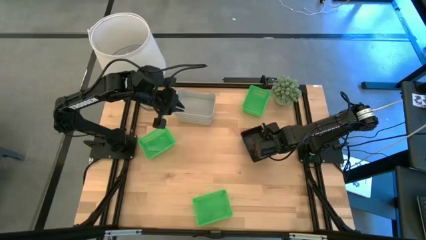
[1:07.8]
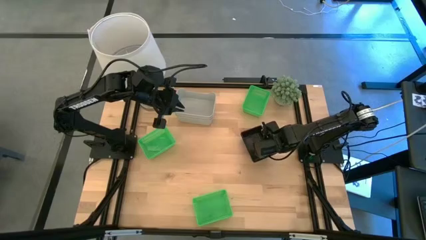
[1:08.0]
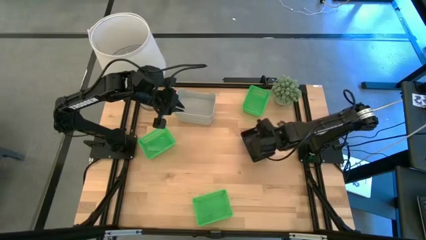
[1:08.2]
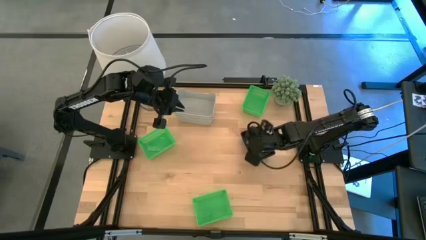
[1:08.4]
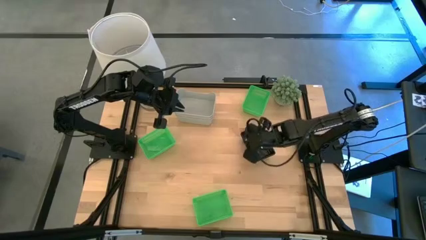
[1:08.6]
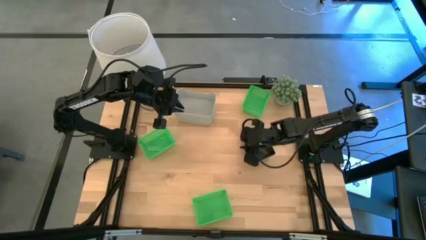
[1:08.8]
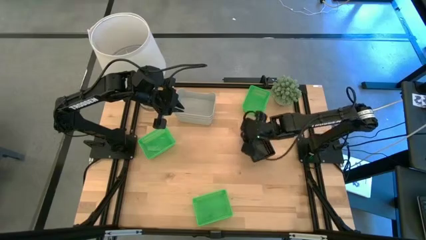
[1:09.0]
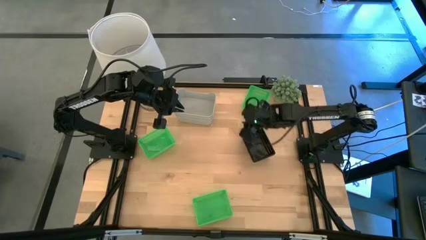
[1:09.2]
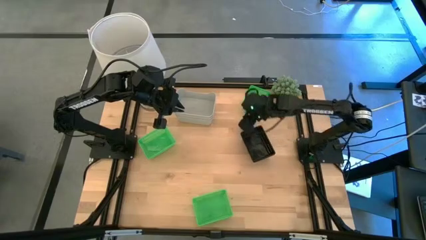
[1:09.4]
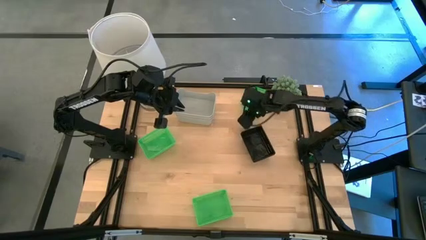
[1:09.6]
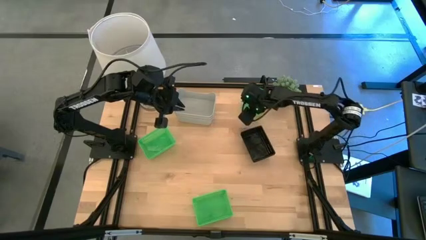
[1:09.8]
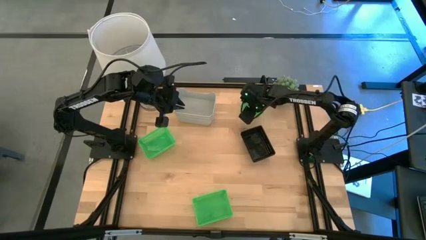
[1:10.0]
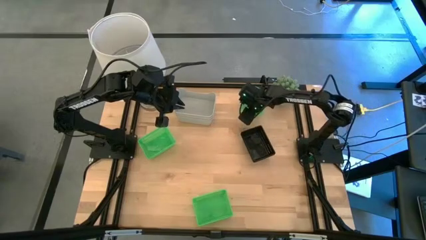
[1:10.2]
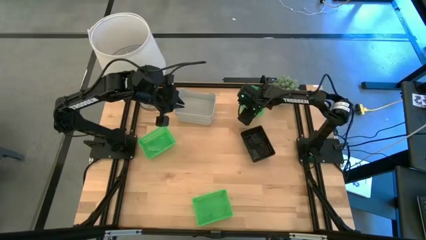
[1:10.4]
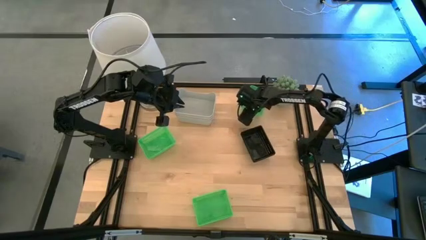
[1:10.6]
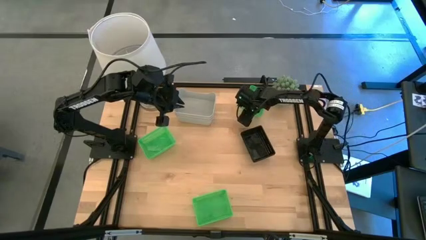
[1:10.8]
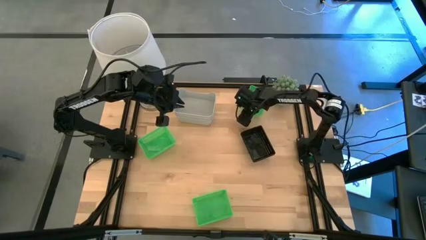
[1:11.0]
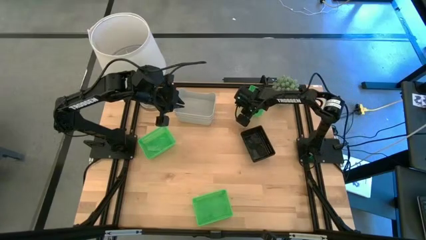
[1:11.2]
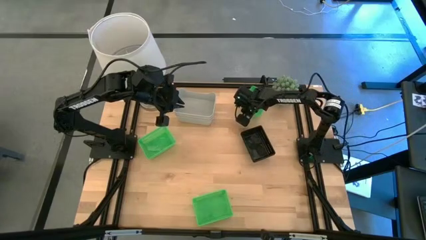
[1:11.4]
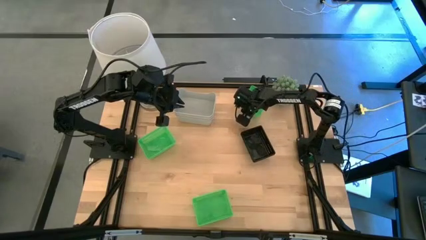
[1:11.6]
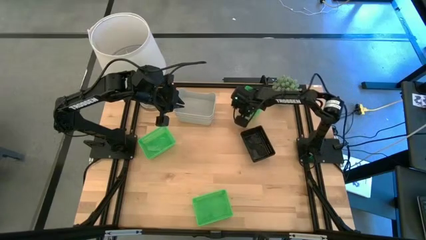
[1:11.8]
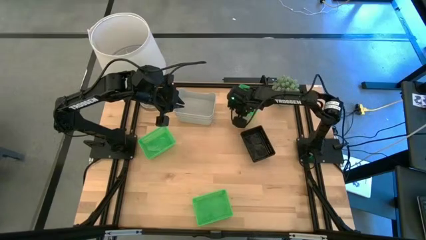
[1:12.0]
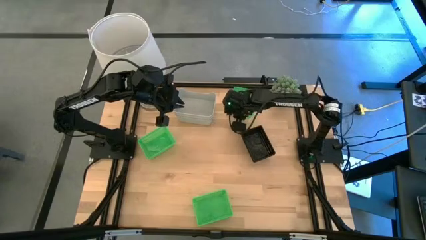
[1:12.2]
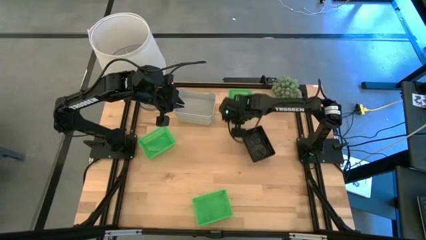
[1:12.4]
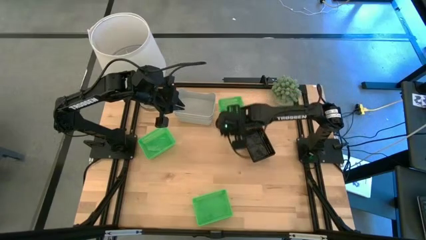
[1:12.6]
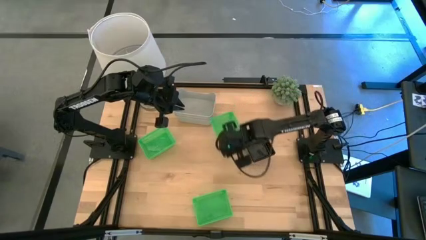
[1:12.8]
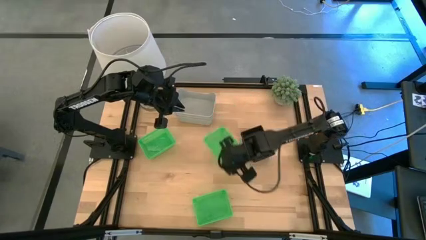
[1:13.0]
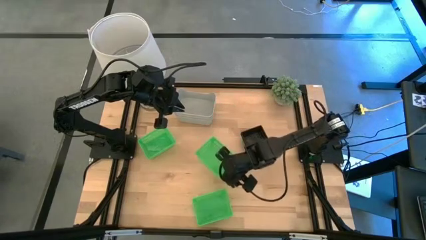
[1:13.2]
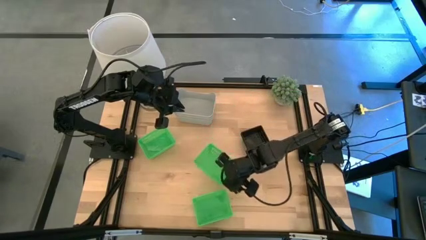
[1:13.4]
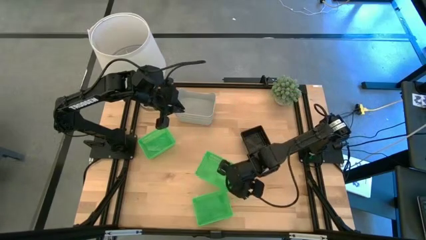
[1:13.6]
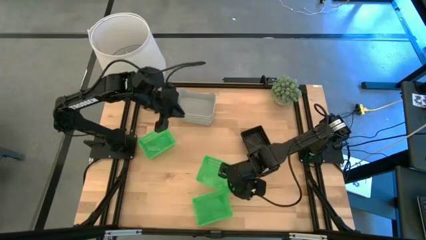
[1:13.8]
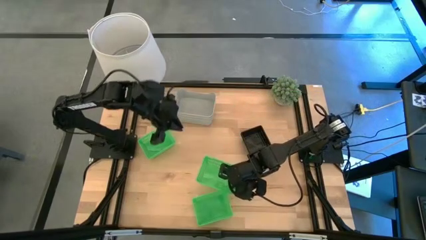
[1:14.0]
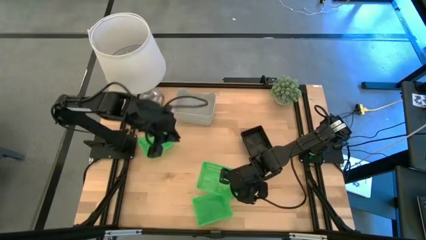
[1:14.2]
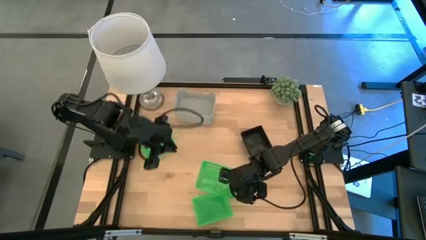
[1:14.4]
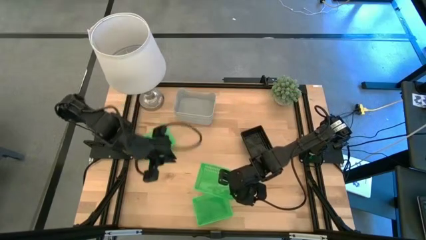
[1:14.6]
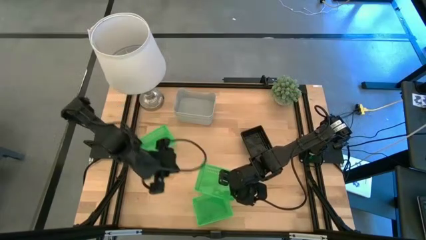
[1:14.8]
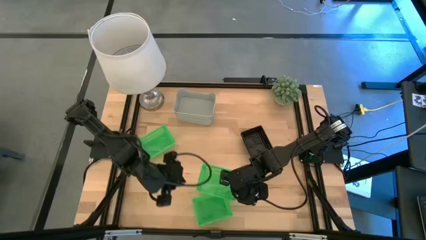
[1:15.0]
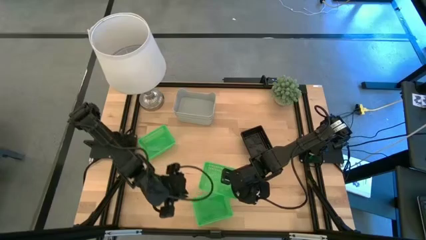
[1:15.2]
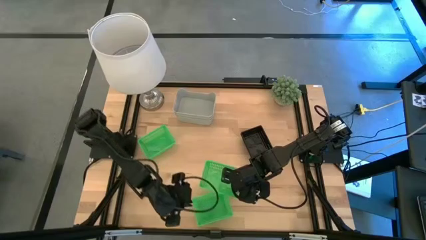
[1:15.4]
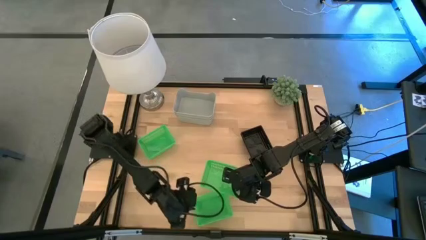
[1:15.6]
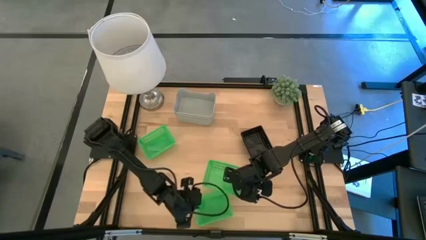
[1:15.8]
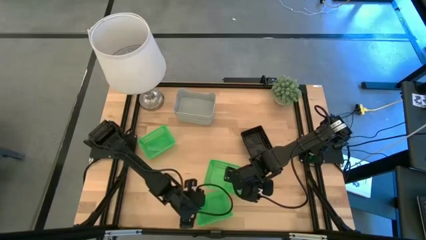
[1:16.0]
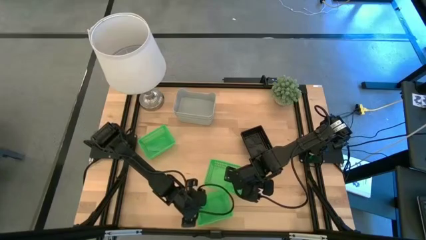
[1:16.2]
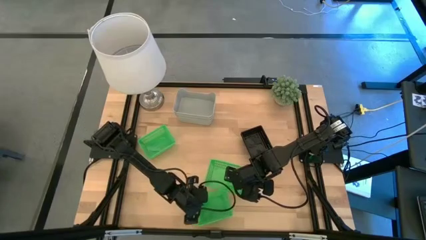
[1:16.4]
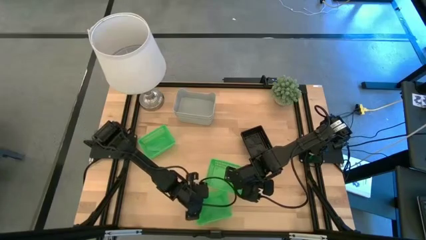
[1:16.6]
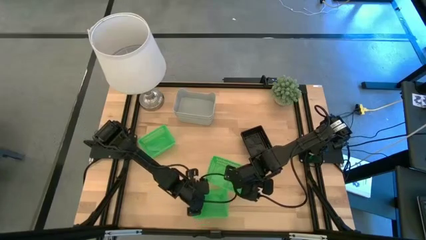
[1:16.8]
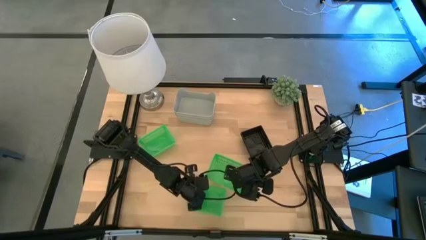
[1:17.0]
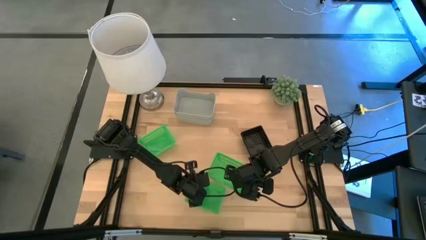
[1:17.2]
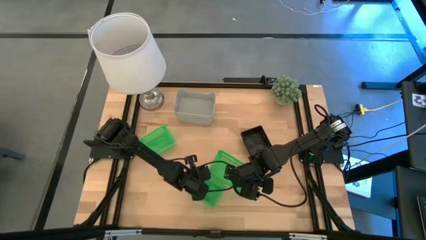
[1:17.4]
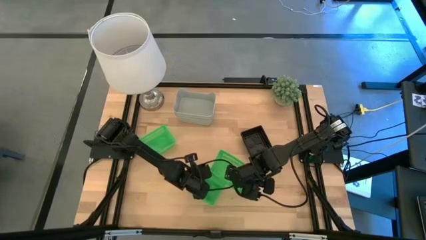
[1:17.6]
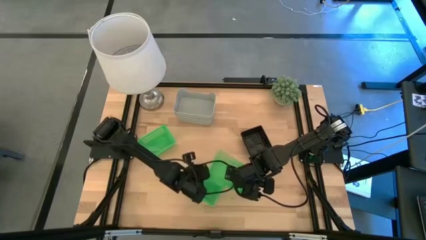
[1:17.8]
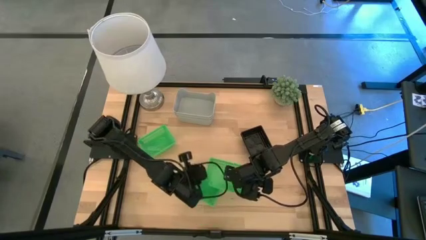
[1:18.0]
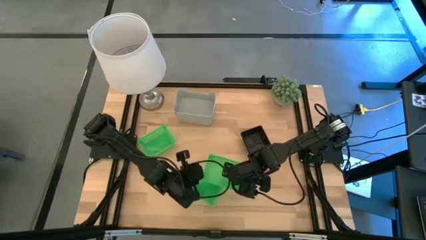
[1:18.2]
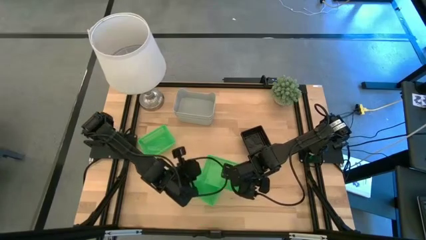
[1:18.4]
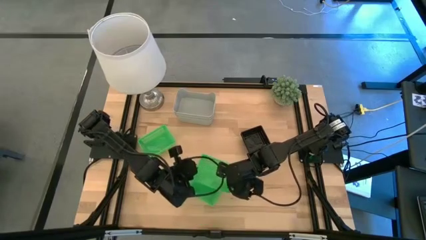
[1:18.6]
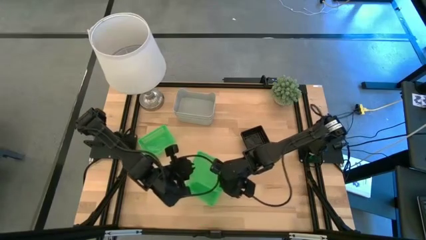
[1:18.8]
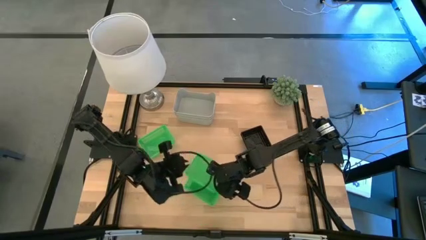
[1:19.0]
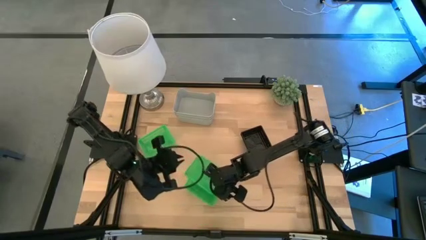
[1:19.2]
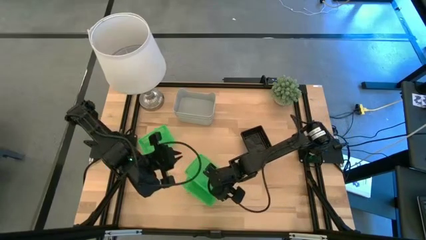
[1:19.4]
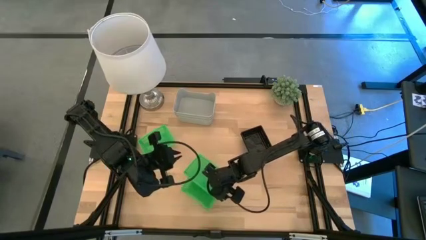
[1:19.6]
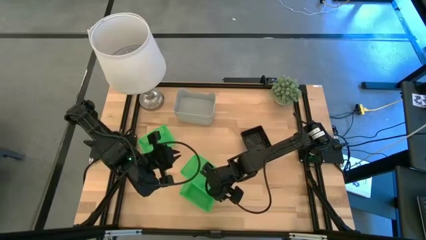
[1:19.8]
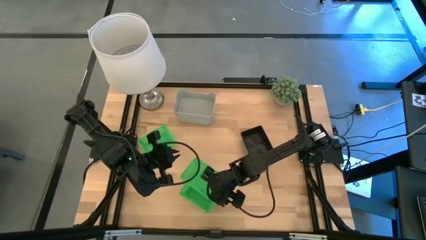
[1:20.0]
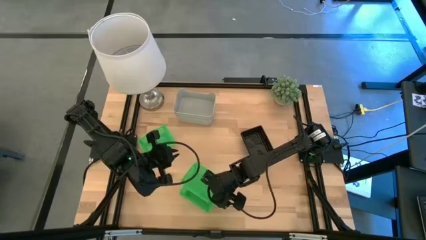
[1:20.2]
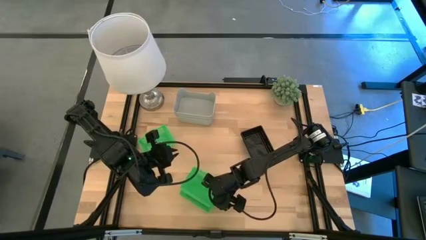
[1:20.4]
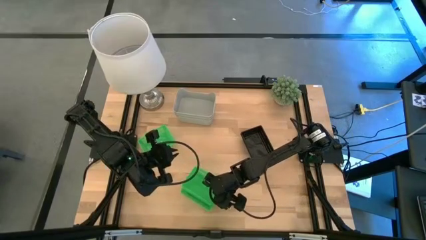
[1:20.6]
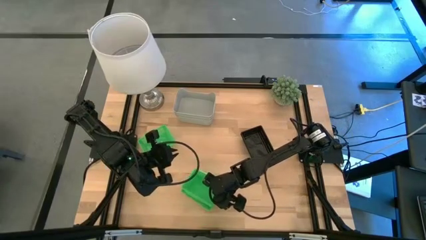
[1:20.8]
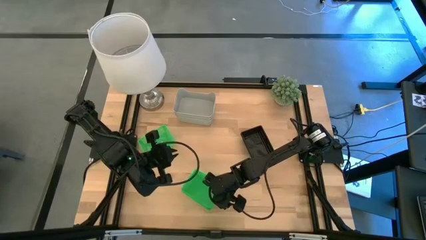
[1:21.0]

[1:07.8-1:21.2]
Stack the top green bin on top of the bottom the green bin
